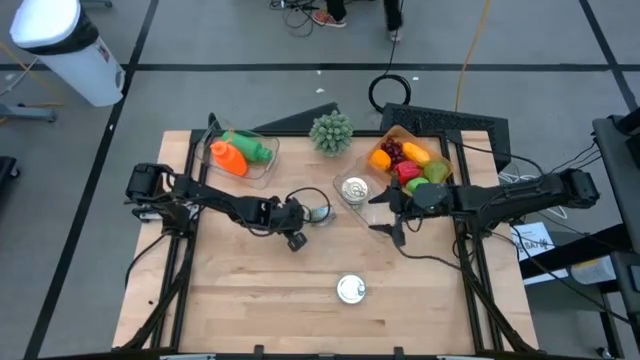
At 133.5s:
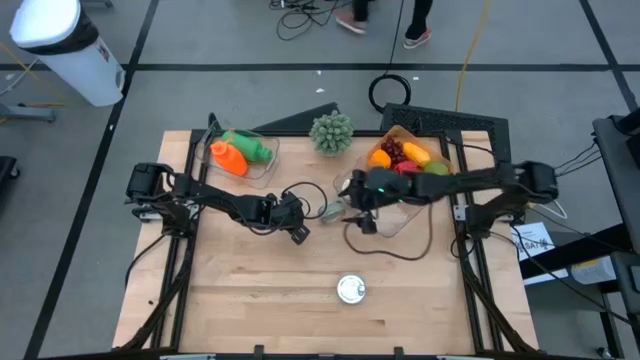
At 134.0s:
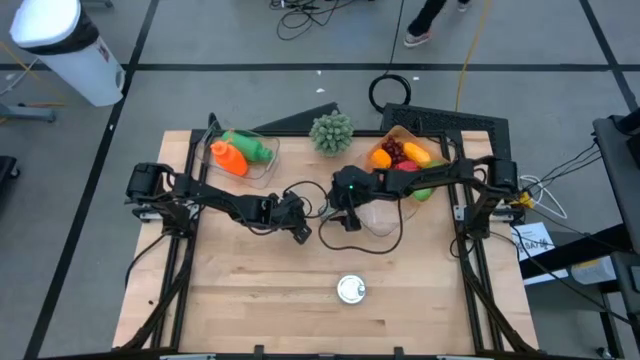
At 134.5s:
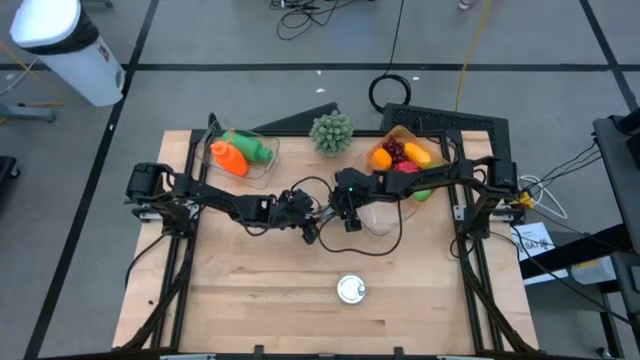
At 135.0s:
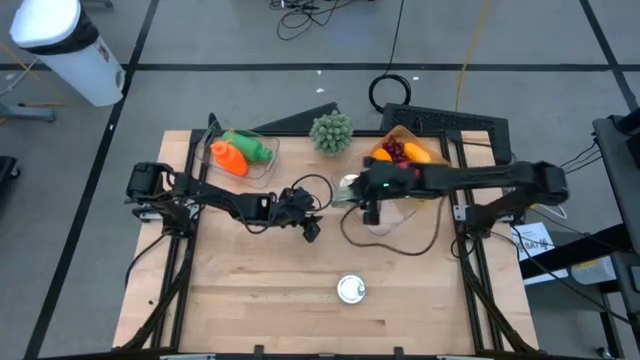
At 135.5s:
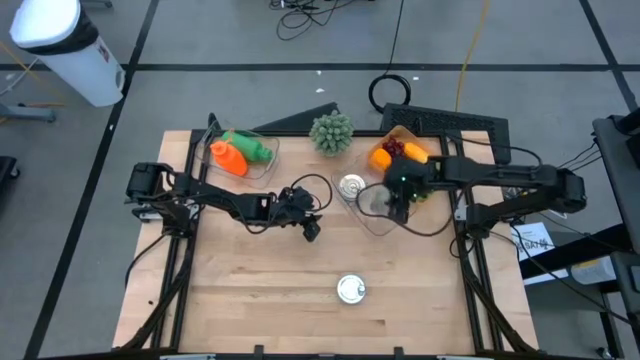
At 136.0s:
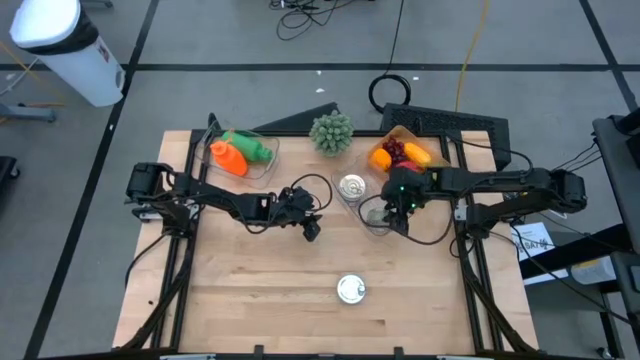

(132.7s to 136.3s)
Task: Pick & Place Food Item
Put the left green tuna can into the right transparent bin

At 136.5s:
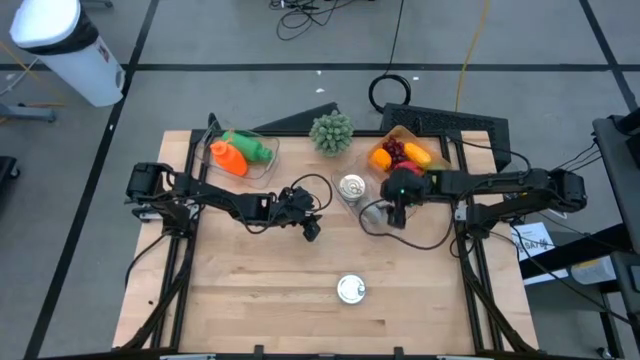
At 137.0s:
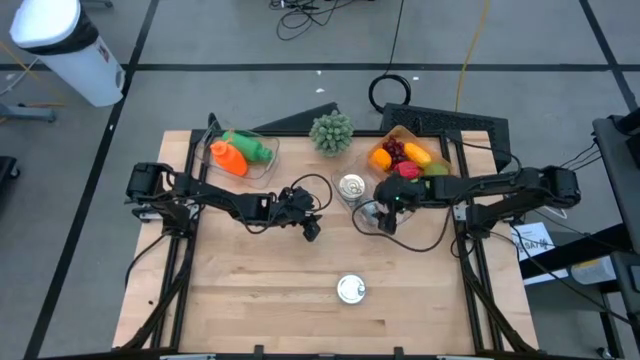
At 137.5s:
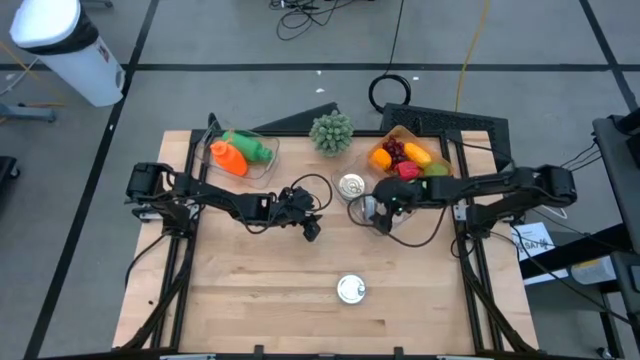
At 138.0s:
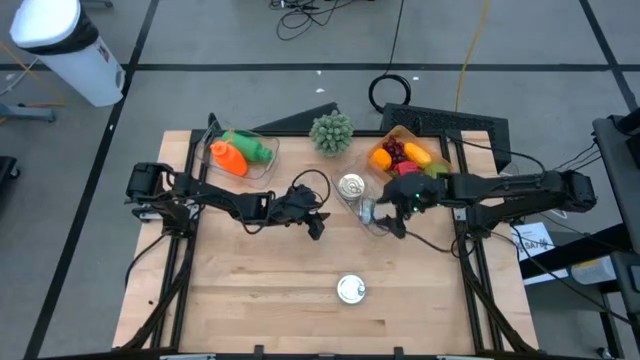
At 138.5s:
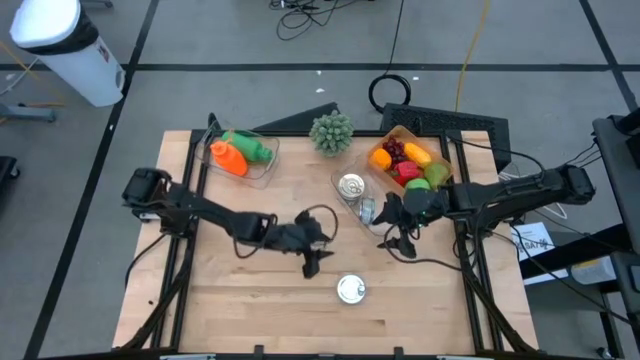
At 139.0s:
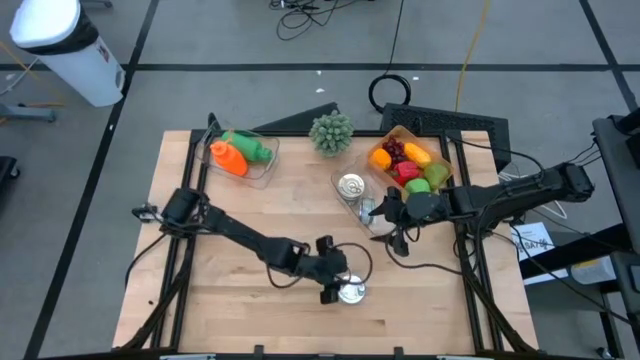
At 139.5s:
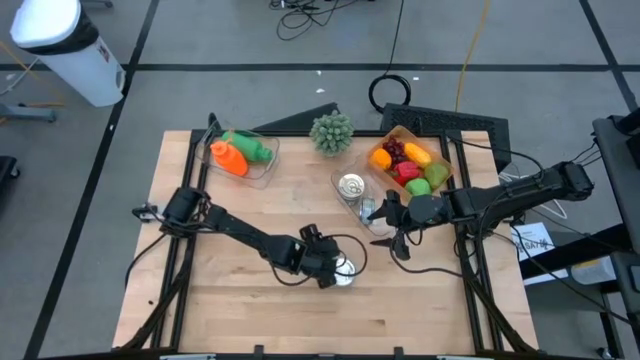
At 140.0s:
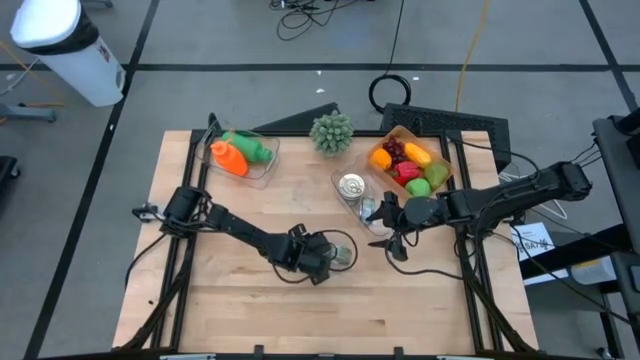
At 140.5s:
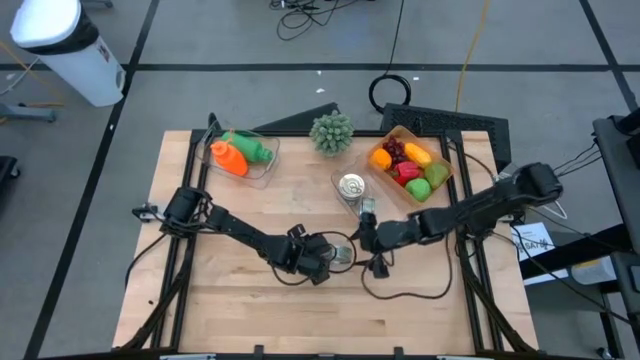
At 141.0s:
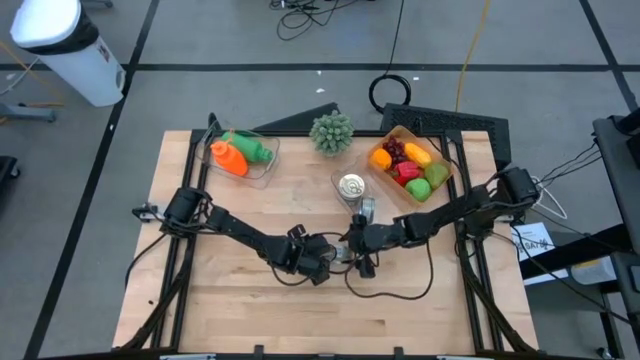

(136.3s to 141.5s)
Put the green tuna can into the right transparent bin

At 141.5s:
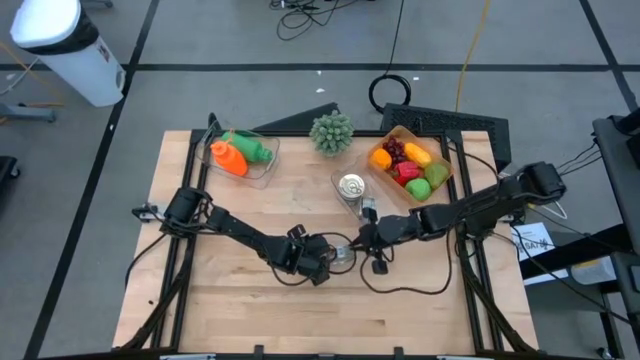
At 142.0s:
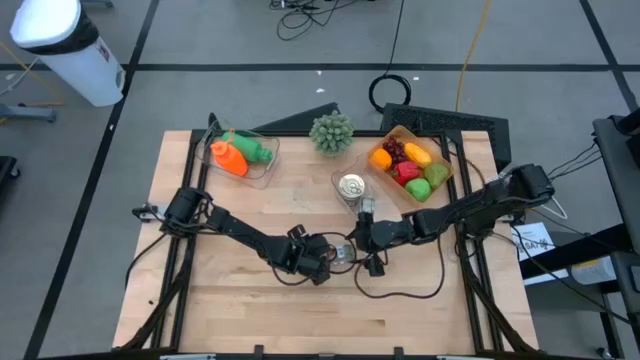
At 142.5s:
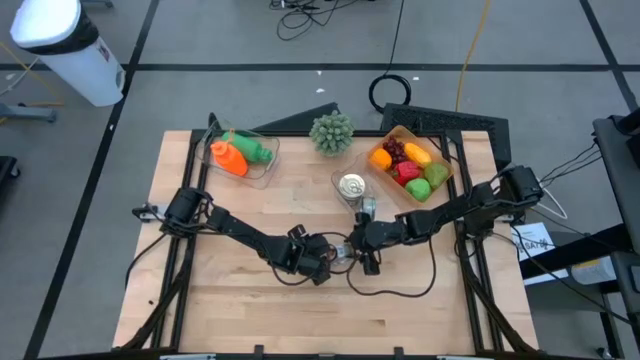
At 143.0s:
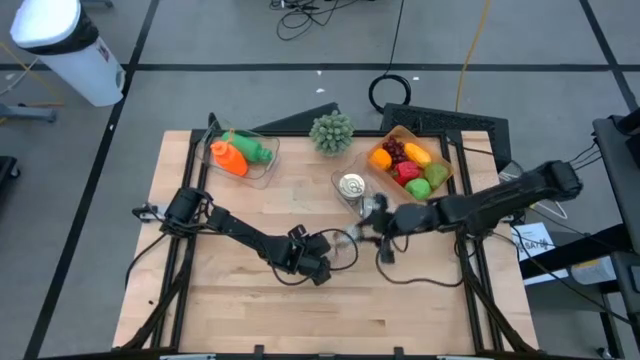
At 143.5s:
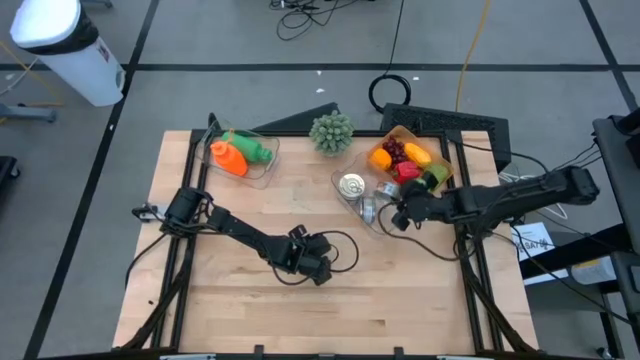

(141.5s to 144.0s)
Put the green tuna can into the right transparent bin

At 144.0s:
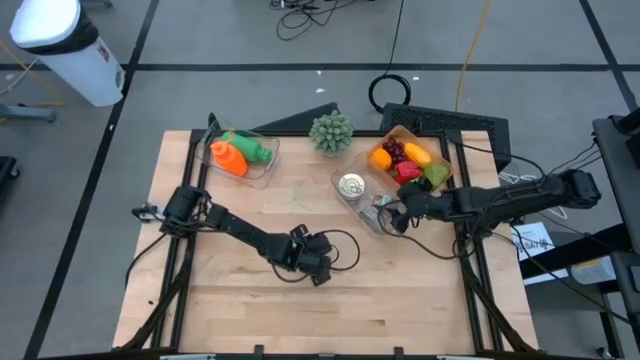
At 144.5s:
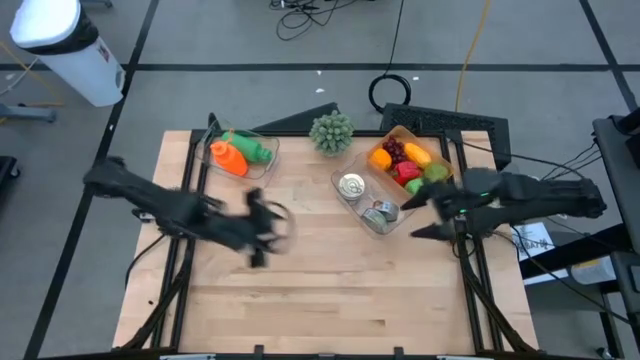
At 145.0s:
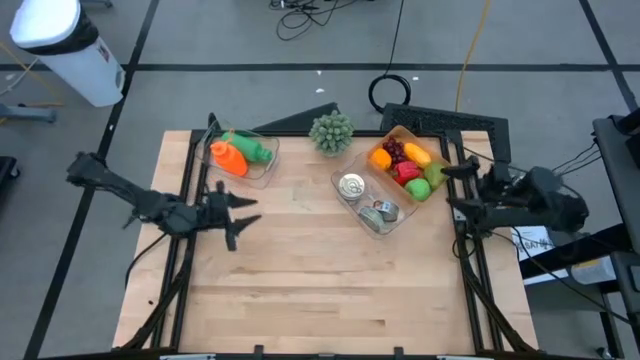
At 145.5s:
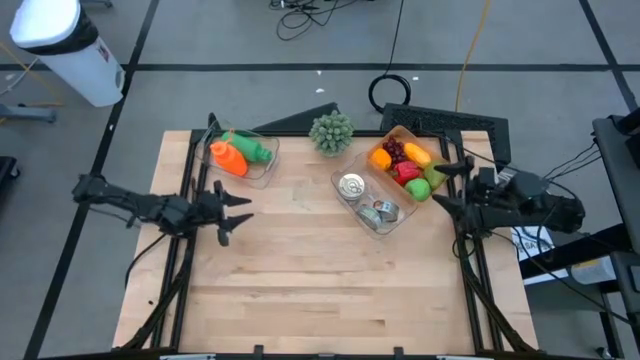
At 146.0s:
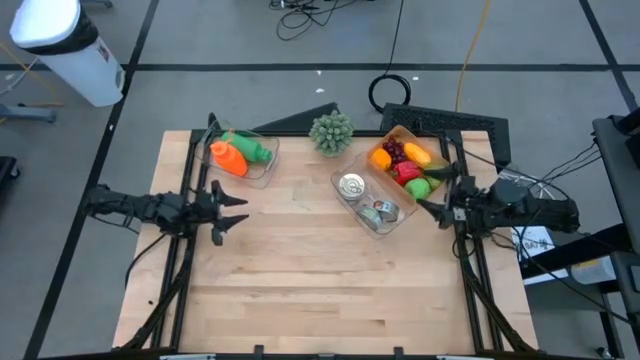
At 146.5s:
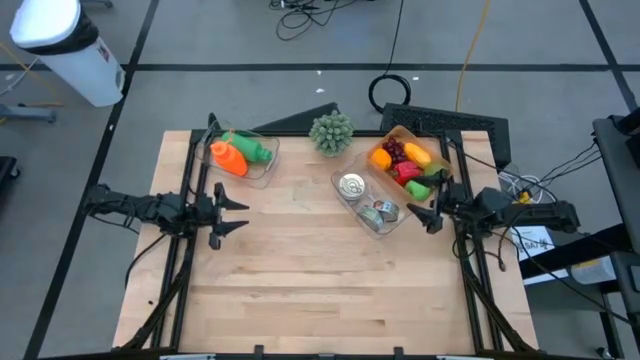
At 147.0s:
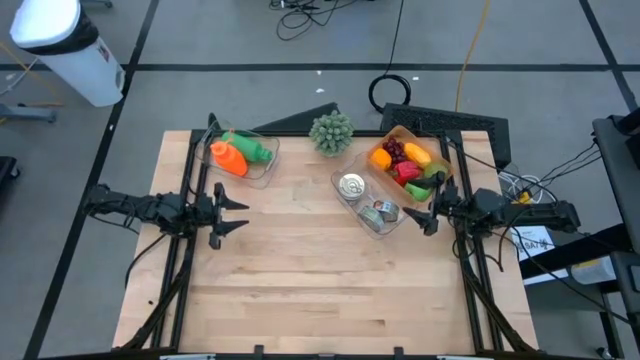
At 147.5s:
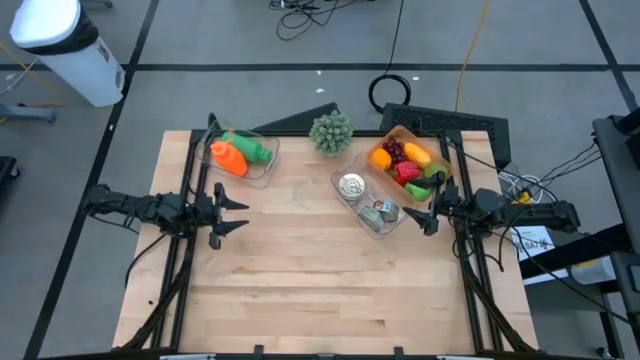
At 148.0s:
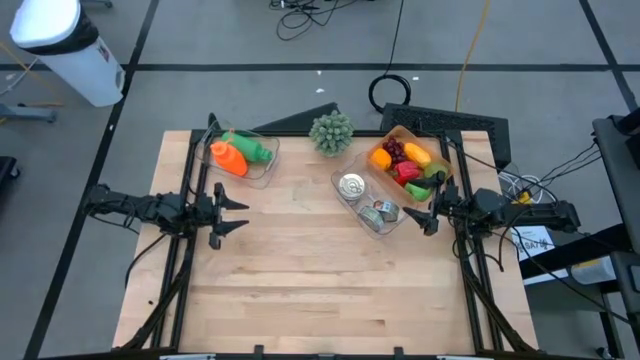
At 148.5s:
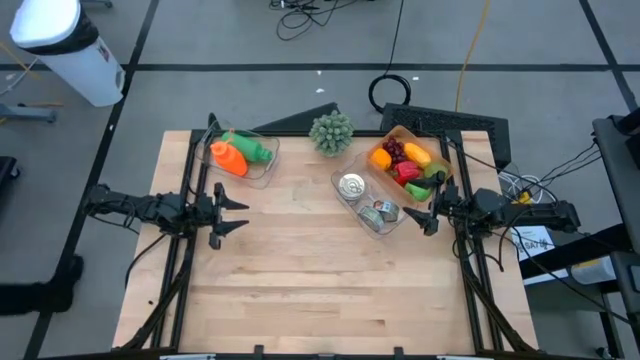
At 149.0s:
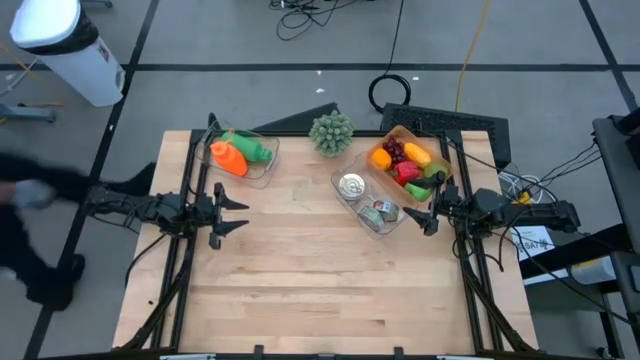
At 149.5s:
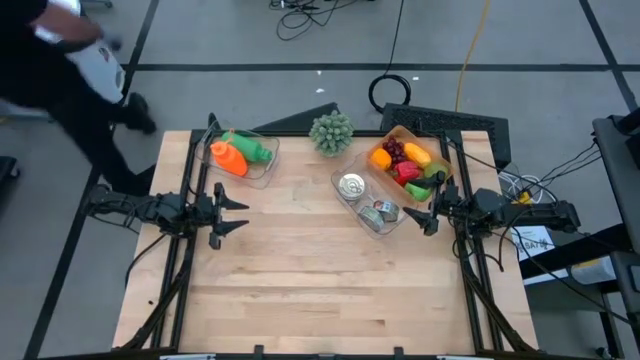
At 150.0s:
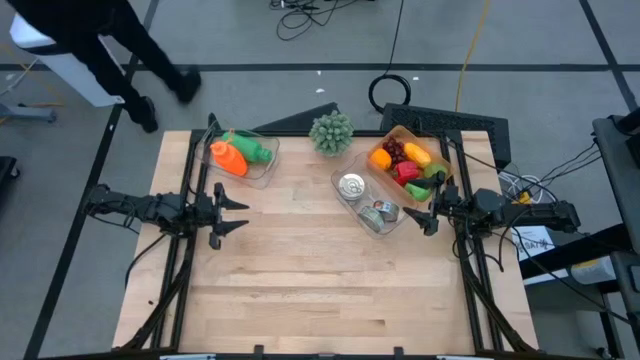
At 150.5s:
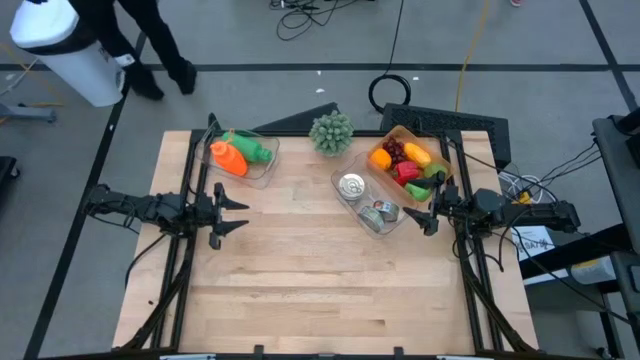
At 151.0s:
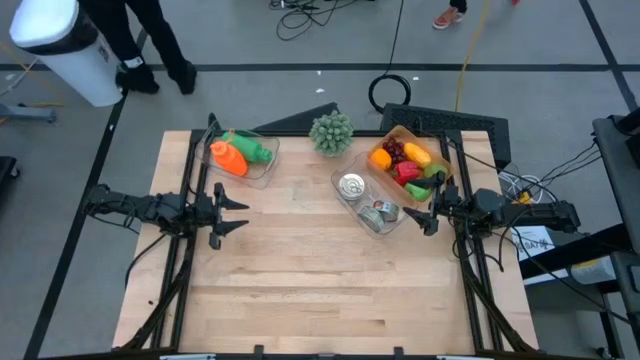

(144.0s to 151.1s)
Return to Home Position

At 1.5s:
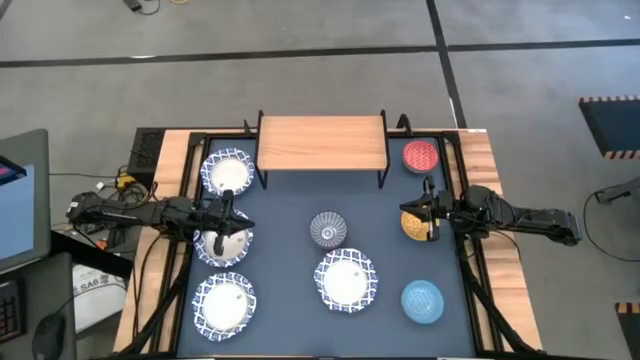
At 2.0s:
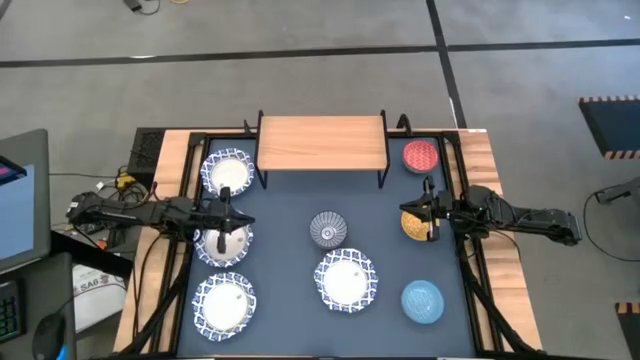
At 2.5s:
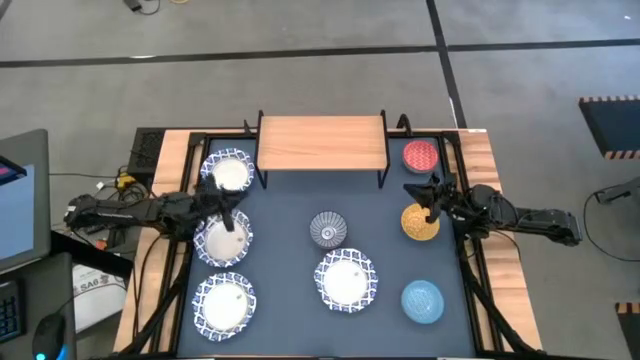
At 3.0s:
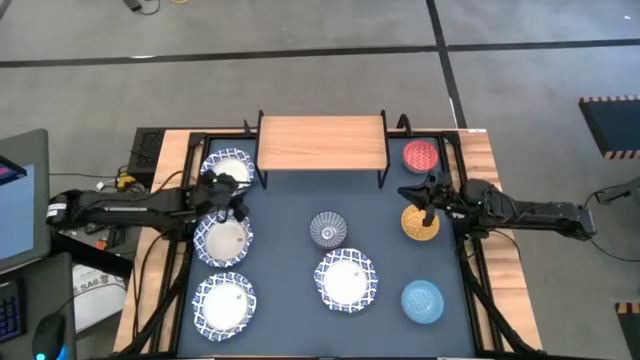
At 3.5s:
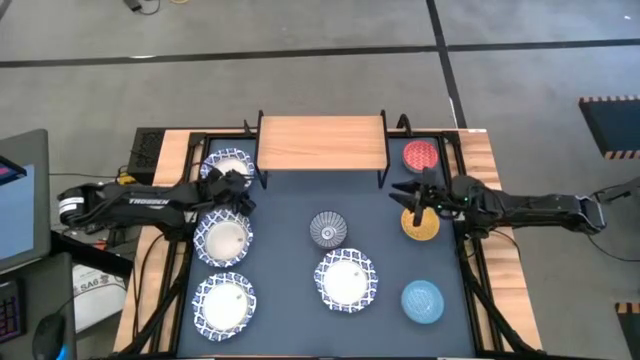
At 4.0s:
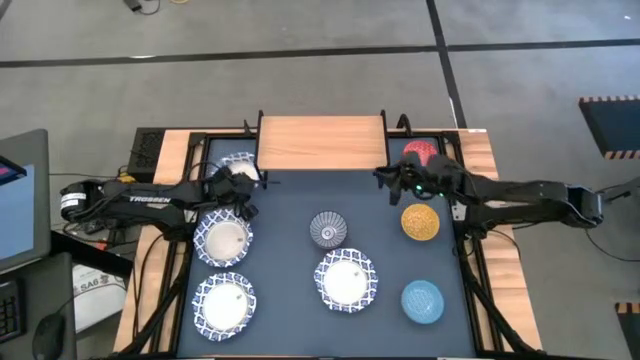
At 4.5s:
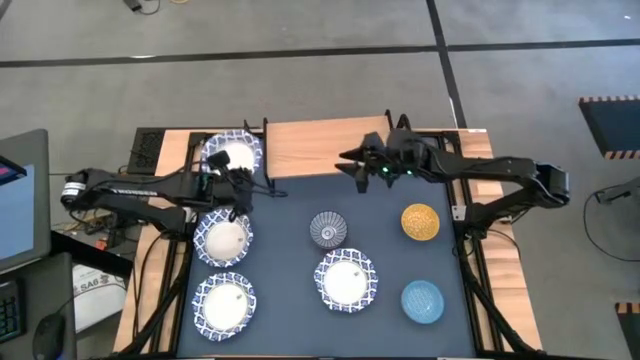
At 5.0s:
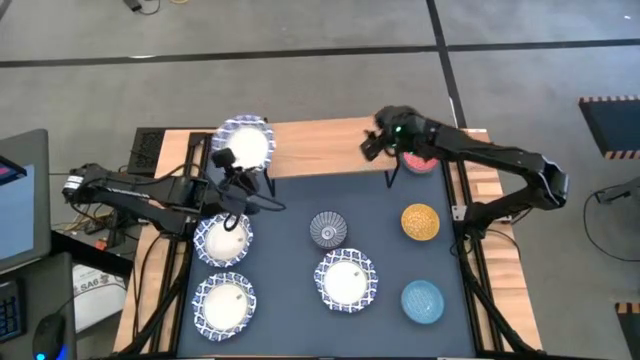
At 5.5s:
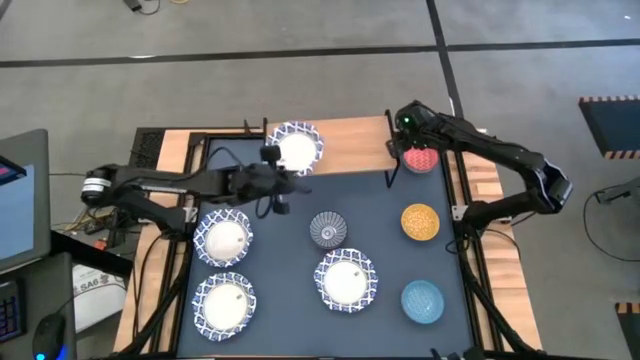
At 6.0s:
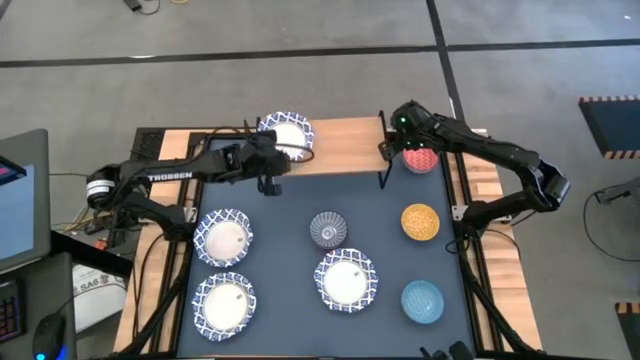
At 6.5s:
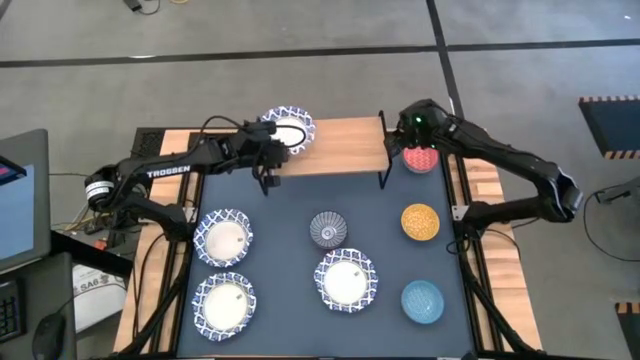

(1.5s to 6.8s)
Task: Place and stack bowls onto a shelf
Put the white patterned bowl on the shelf
